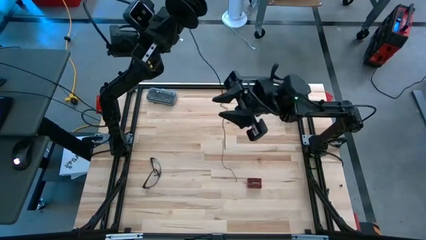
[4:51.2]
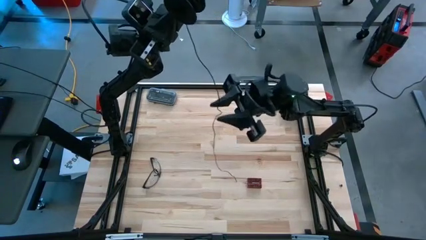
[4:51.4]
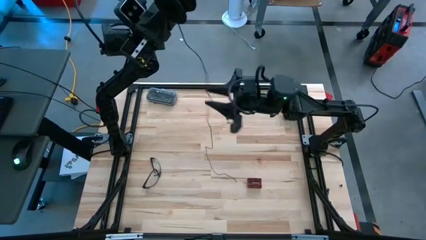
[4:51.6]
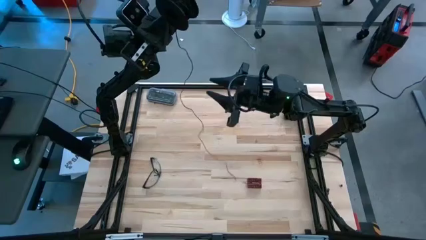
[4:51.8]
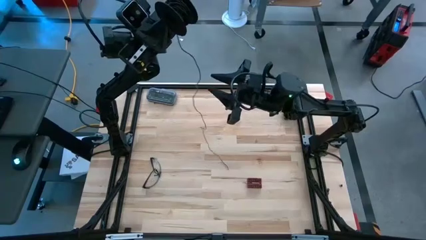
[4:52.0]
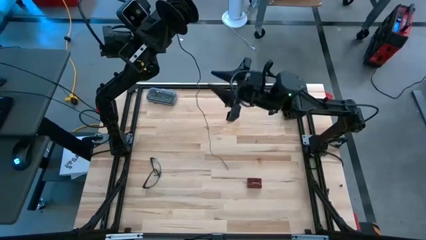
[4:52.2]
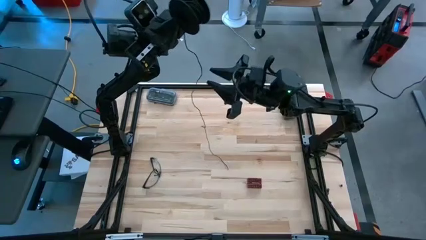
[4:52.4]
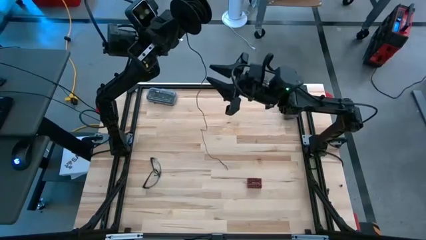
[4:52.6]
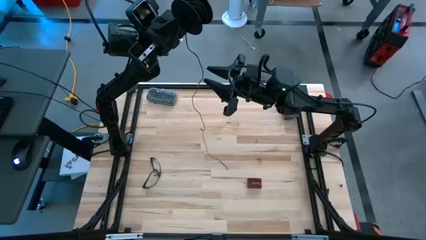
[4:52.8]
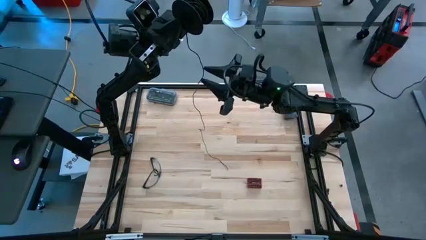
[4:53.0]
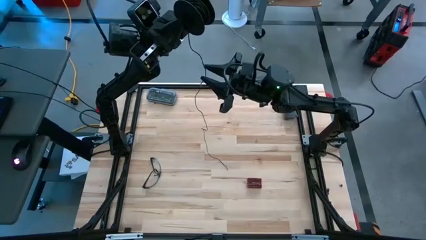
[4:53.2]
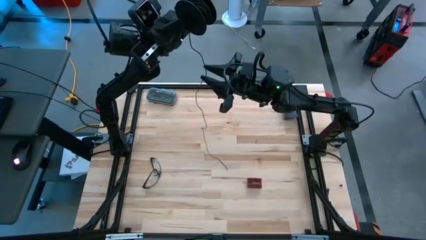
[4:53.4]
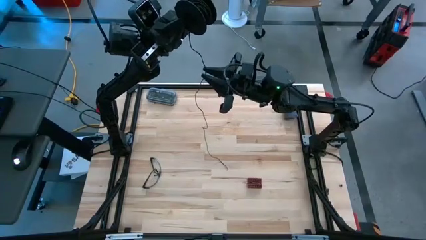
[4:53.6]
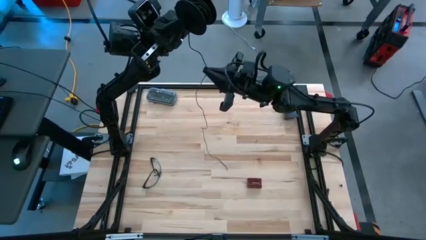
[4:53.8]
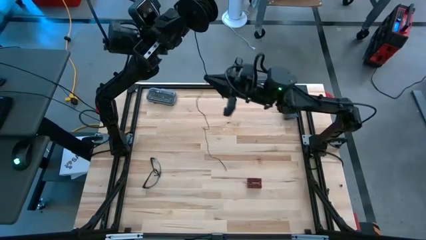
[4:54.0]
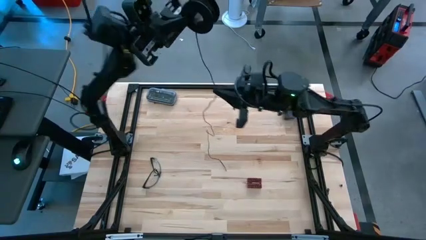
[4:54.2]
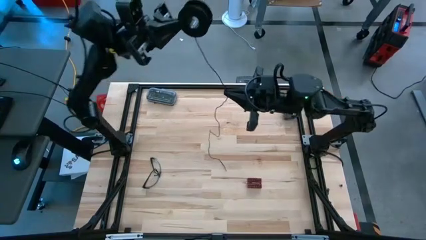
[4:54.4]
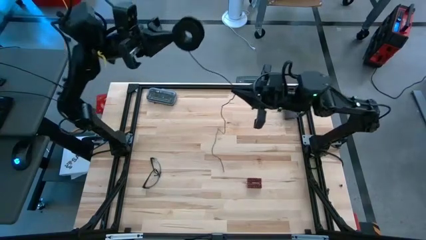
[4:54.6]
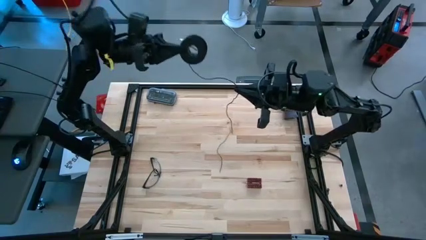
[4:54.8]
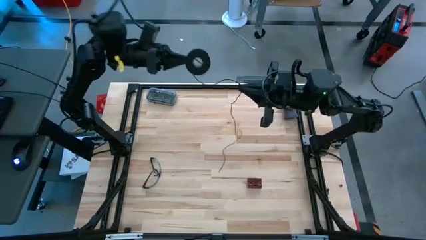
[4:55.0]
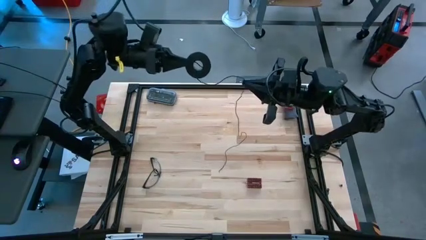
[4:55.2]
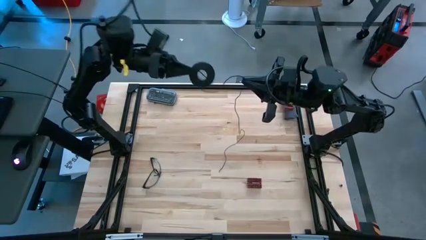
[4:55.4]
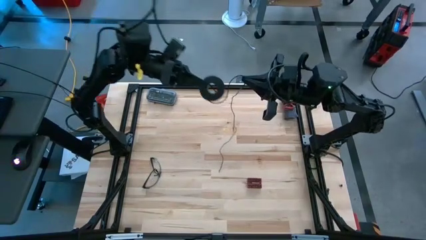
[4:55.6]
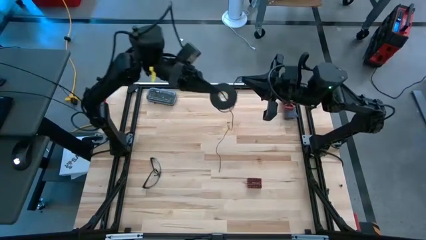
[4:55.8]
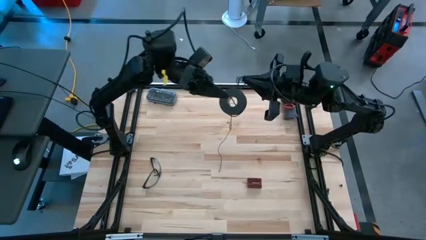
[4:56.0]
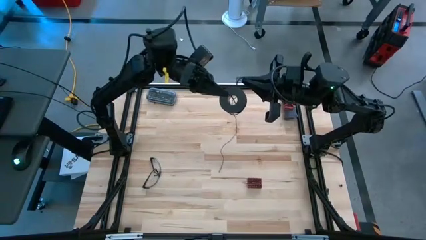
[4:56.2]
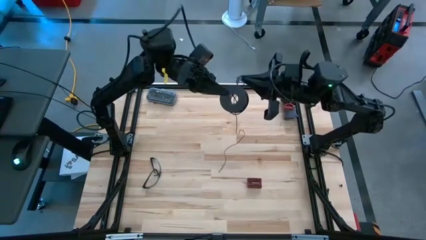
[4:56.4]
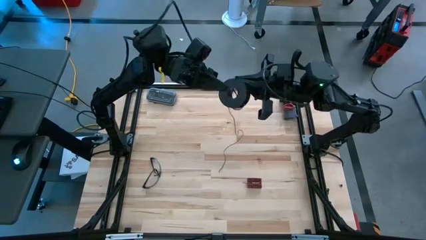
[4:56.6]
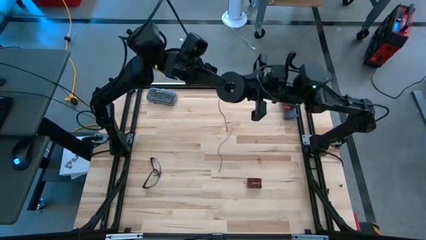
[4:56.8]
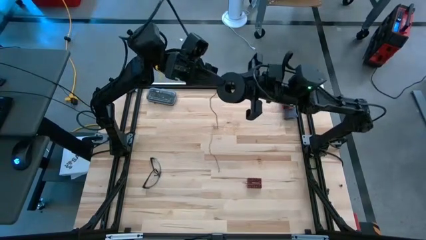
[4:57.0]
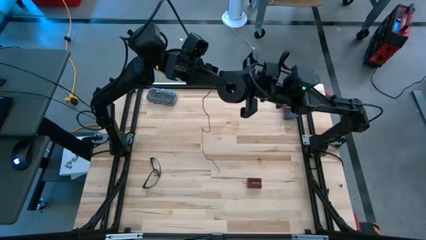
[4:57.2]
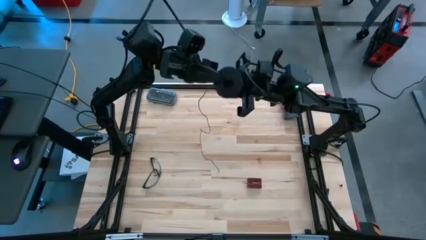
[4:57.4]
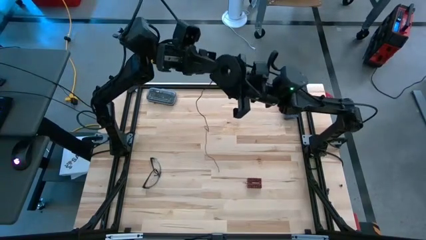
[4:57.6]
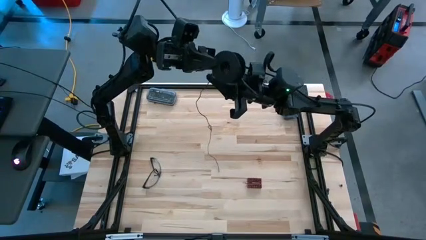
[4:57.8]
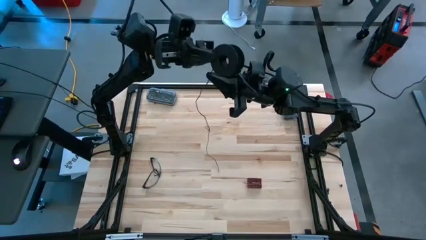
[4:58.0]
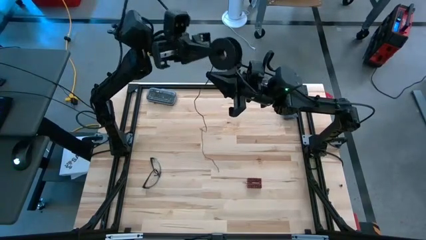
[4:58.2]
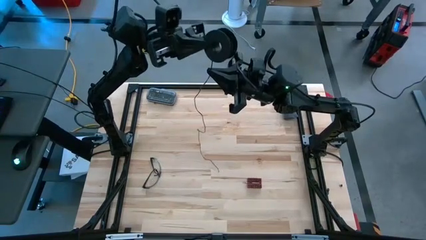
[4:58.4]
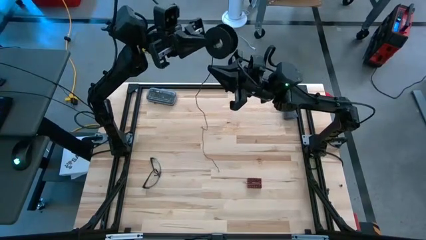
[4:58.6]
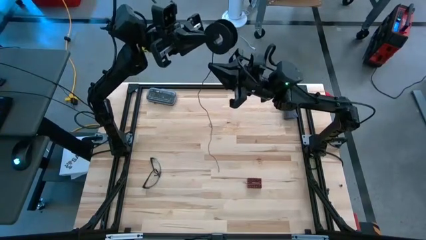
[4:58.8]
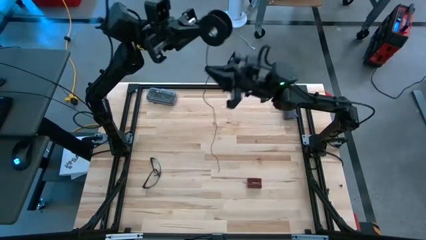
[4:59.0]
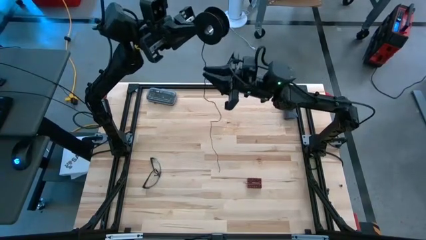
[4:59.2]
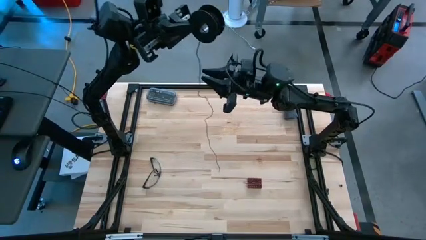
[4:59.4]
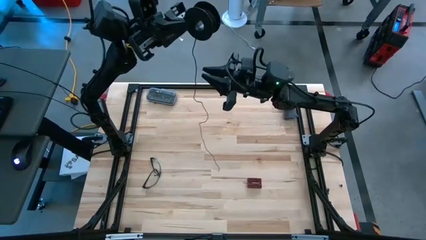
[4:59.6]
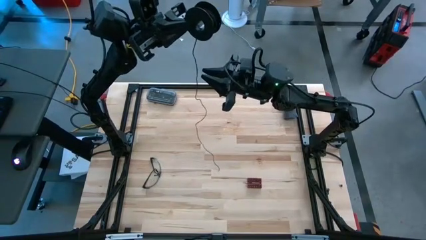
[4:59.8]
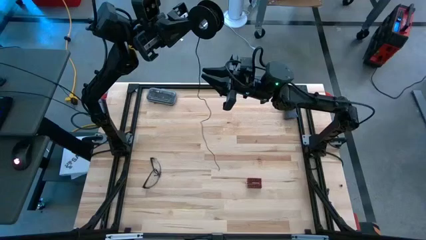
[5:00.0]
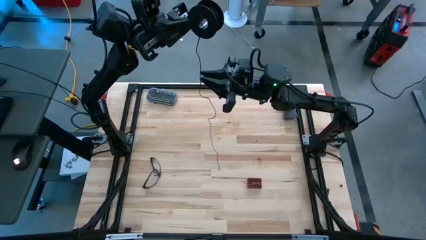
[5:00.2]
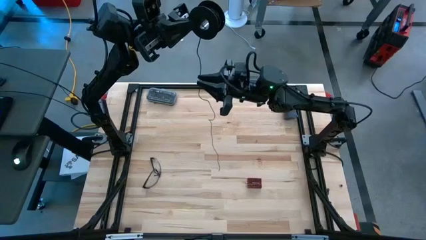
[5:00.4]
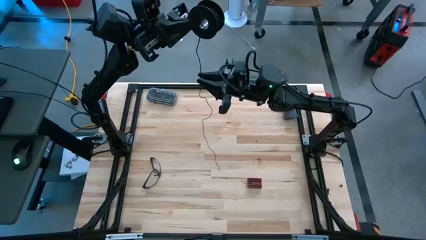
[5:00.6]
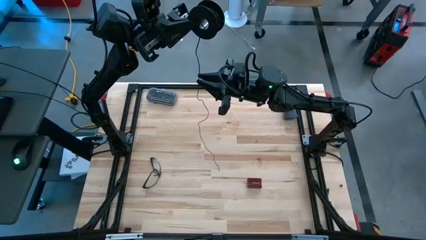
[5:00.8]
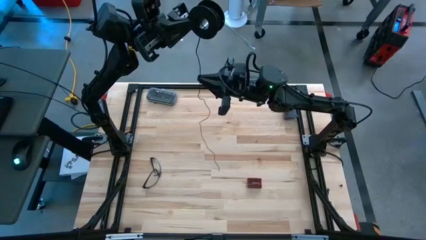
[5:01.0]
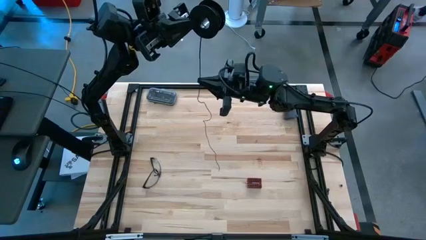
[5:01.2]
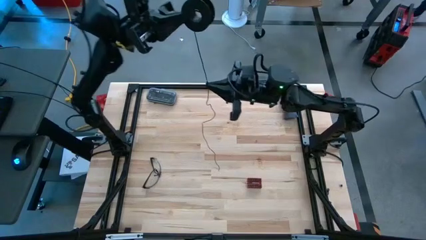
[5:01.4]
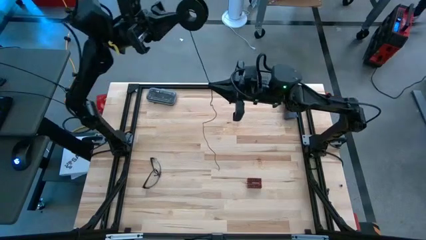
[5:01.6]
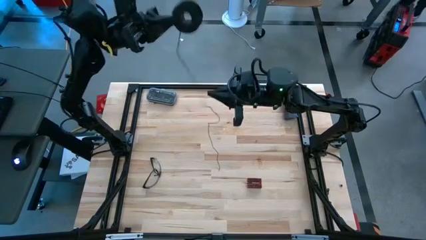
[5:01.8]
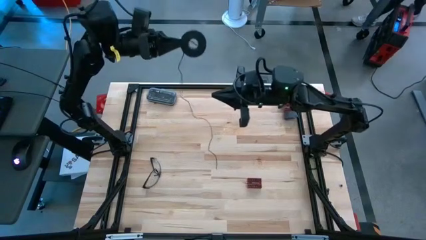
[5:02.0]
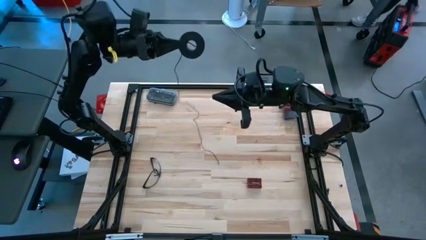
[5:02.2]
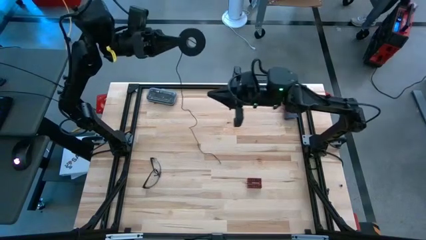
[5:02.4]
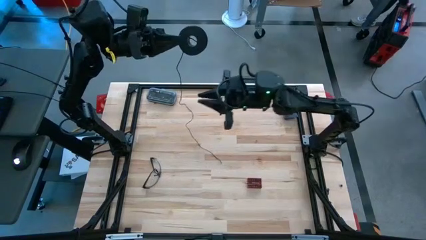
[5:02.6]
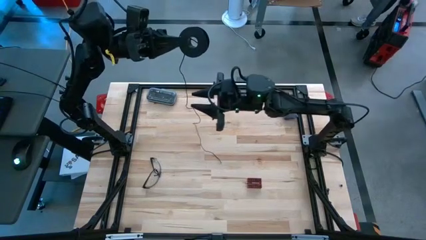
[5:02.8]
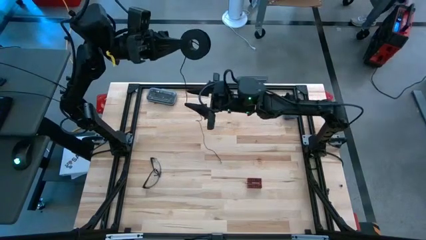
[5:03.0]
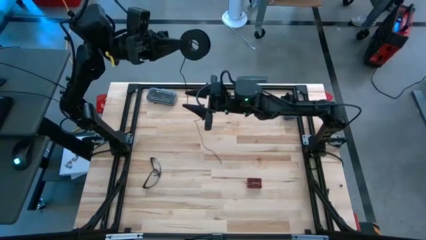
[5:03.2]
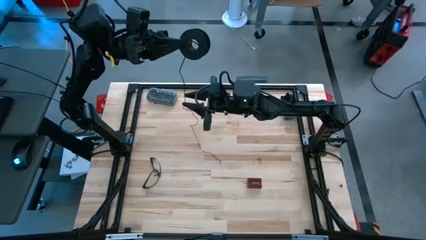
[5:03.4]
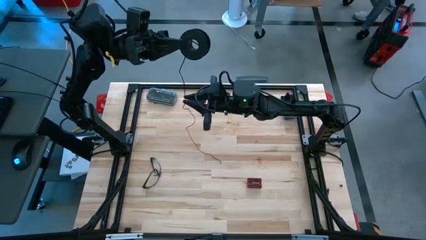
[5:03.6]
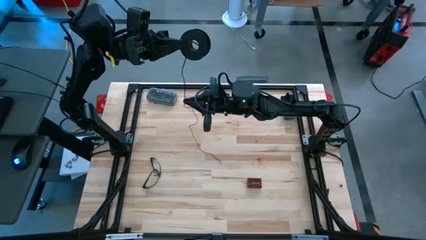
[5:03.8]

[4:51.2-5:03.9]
Task: Coil cords
Coil the black wire into the spool

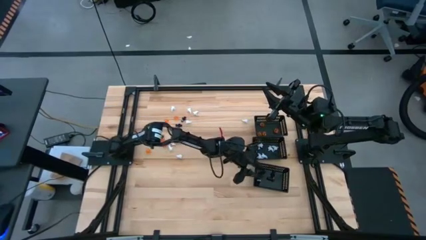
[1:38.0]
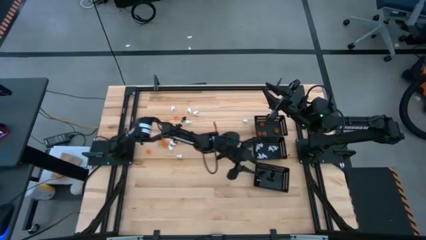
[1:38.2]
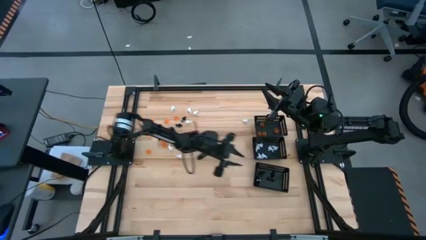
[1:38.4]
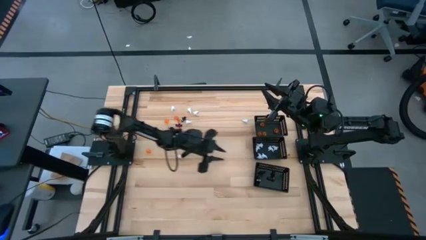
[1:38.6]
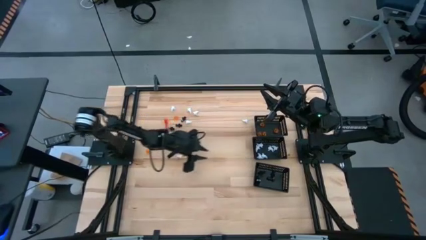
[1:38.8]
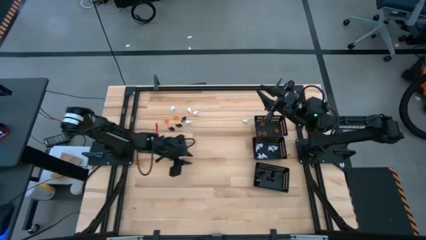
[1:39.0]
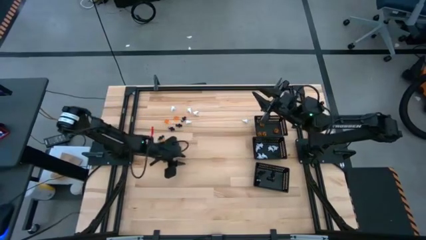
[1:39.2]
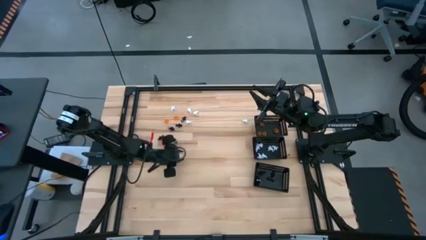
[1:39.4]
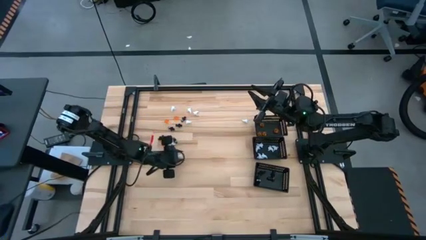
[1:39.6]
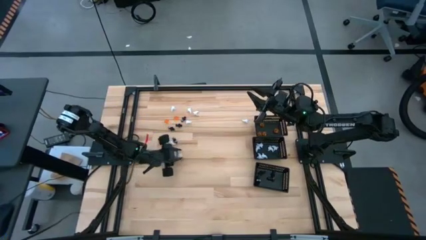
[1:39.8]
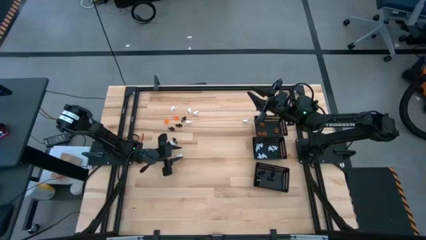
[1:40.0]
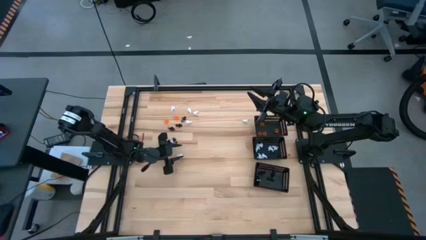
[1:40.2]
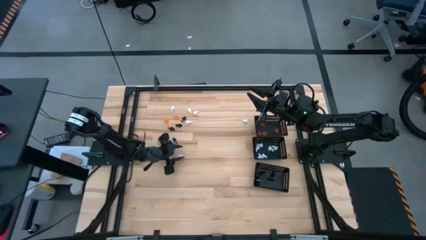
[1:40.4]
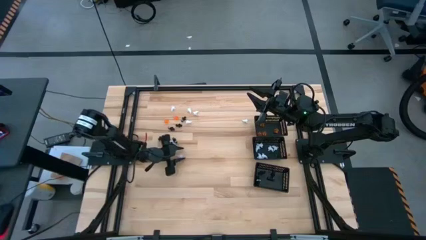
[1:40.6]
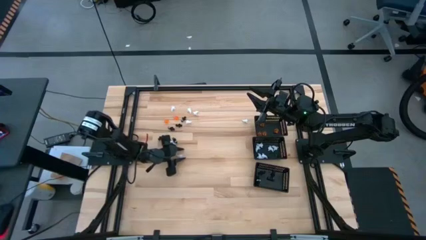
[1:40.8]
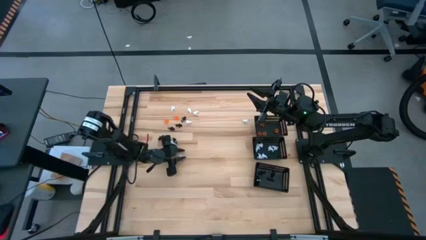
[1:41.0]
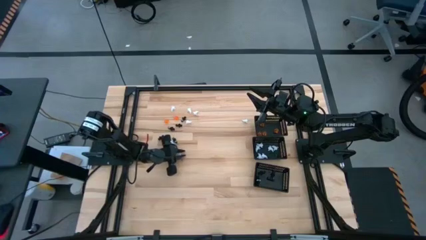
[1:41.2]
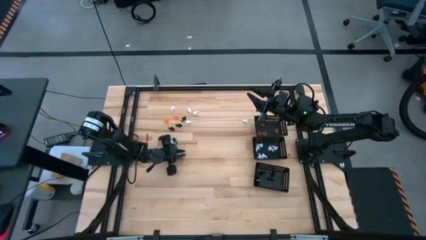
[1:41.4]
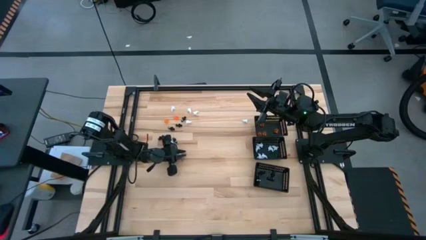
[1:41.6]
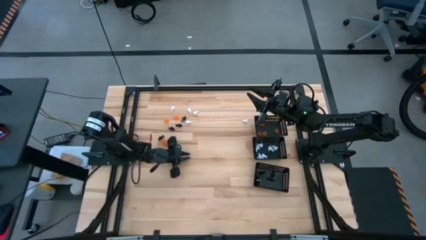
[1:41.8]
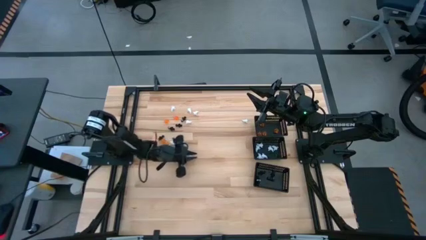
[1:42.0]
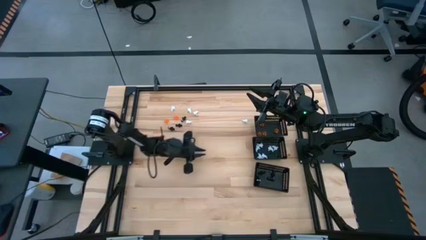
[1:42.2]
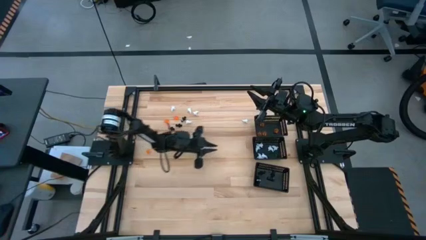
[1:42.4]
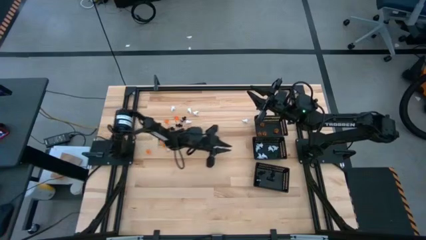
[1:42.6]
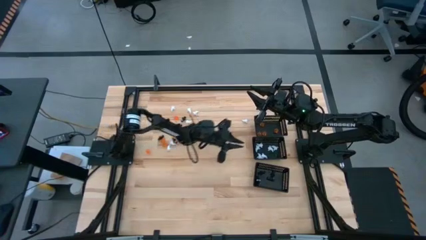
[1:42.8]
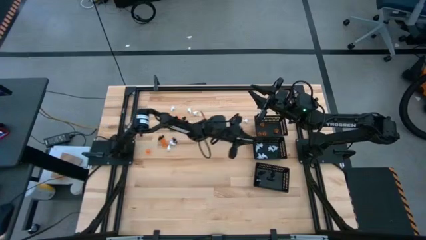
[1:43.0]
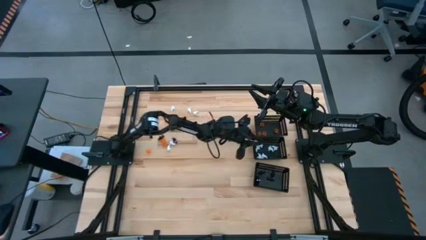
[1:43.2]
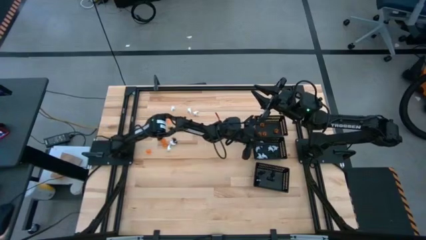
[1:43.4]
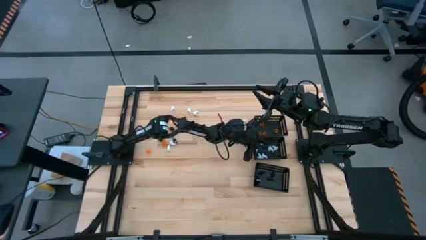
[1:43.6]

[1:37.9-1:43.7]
Task: Sort Halloween decoration
Put the white ghost toy into the center black bin
